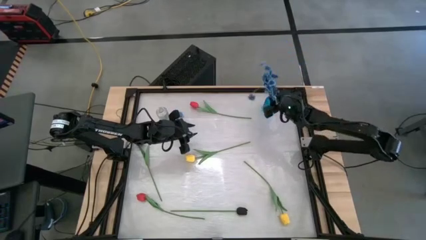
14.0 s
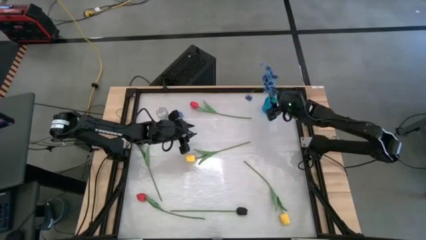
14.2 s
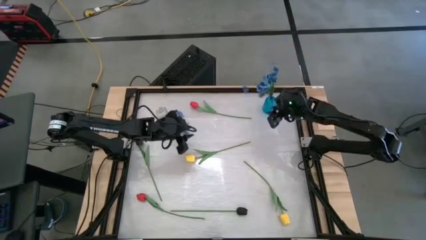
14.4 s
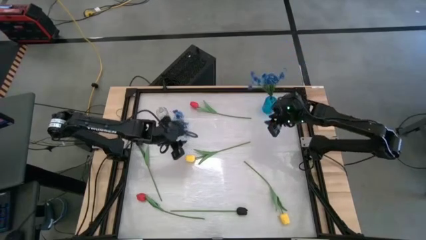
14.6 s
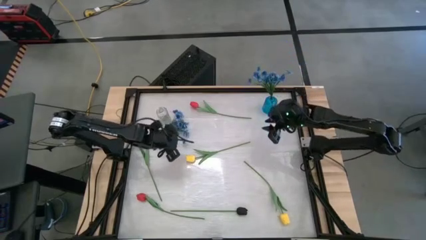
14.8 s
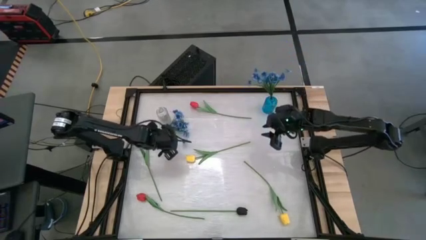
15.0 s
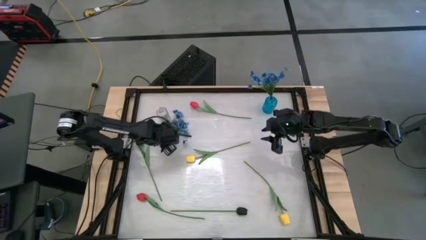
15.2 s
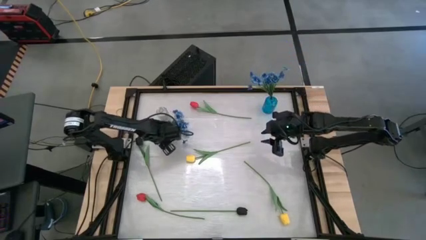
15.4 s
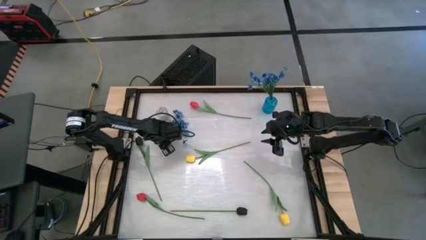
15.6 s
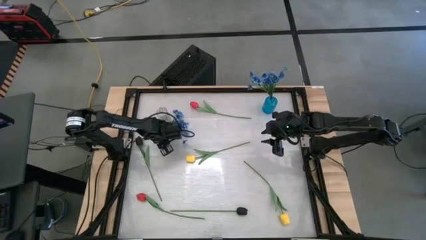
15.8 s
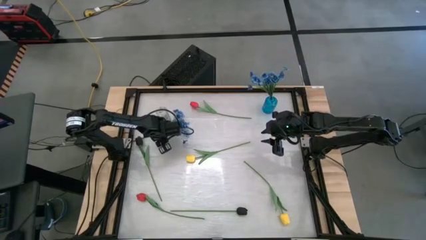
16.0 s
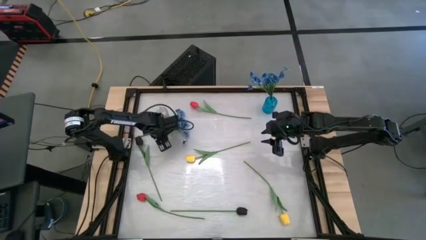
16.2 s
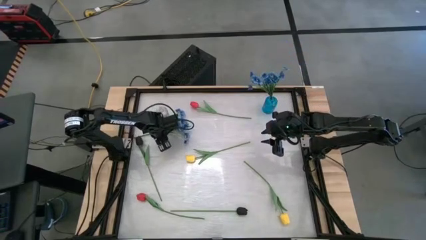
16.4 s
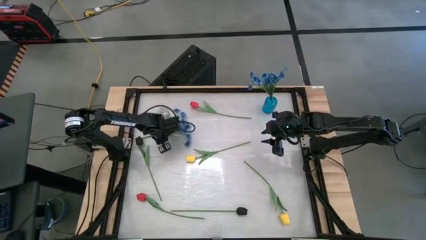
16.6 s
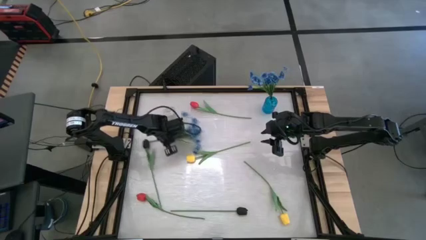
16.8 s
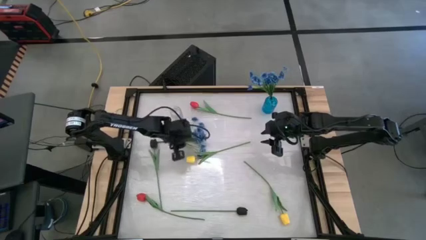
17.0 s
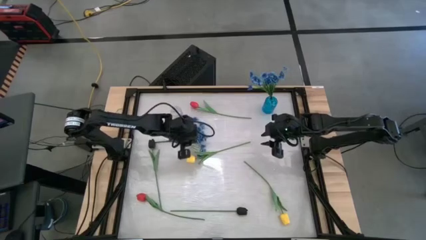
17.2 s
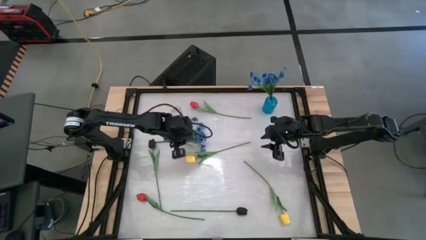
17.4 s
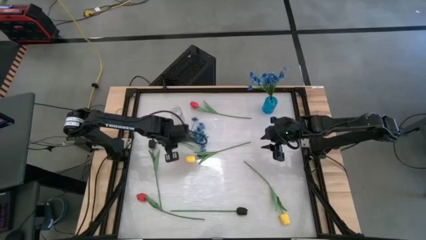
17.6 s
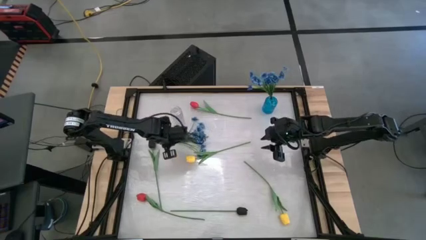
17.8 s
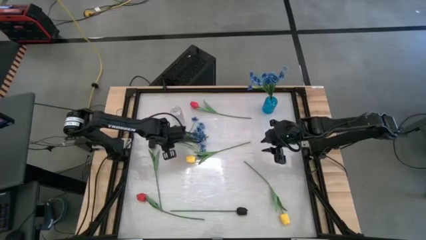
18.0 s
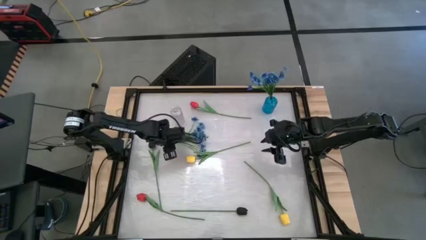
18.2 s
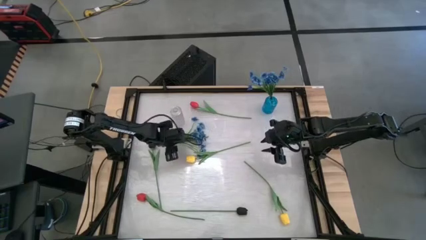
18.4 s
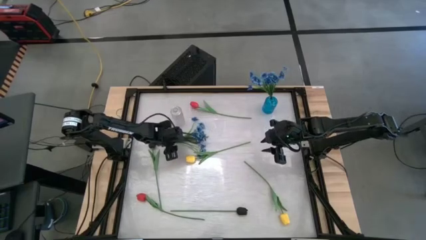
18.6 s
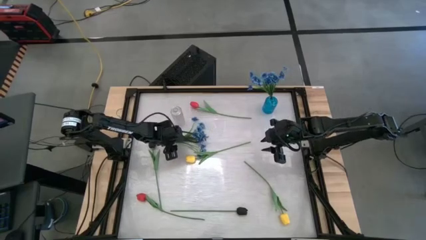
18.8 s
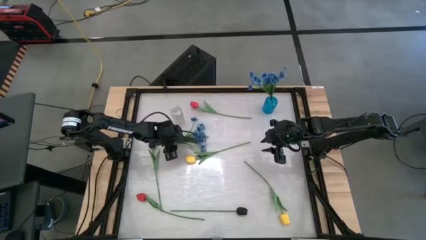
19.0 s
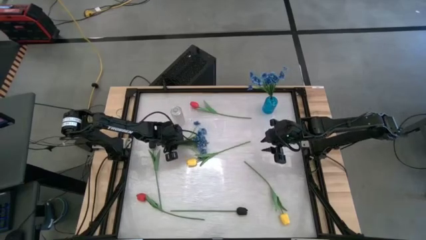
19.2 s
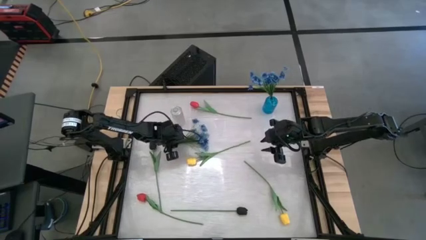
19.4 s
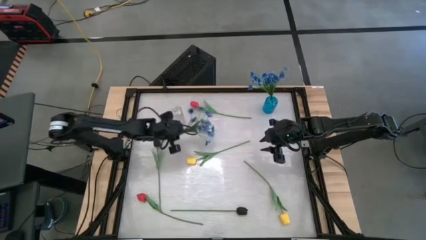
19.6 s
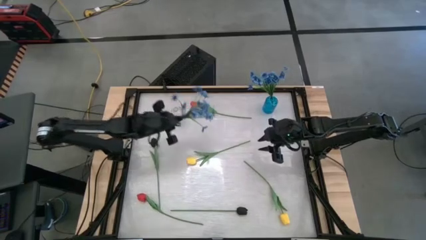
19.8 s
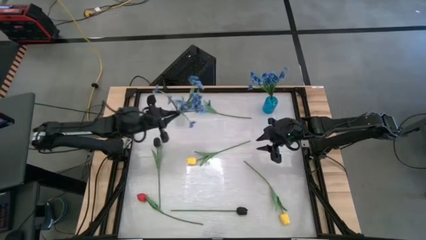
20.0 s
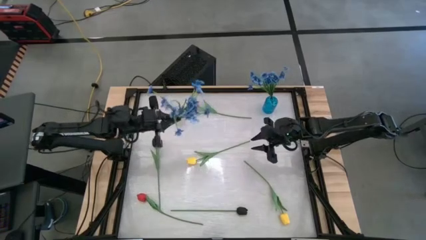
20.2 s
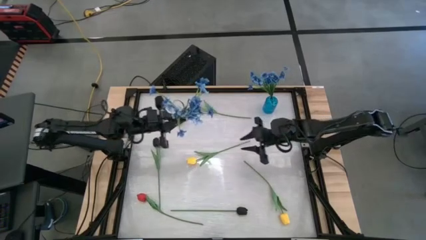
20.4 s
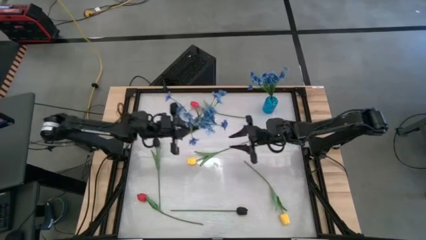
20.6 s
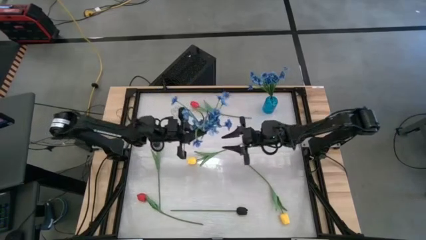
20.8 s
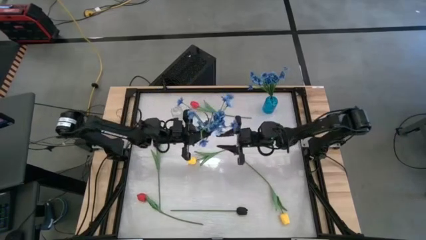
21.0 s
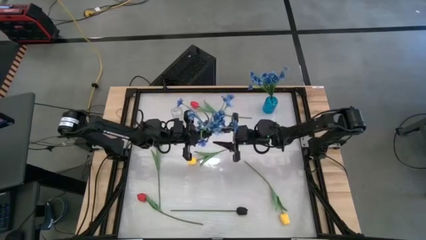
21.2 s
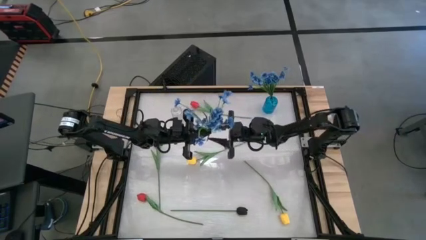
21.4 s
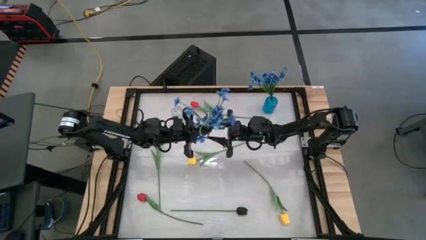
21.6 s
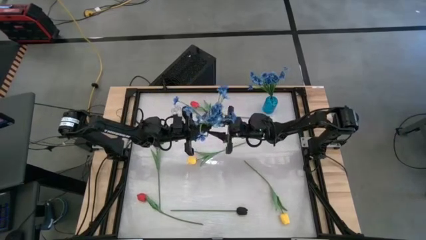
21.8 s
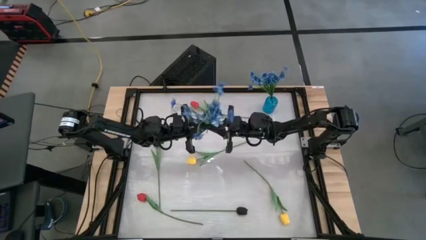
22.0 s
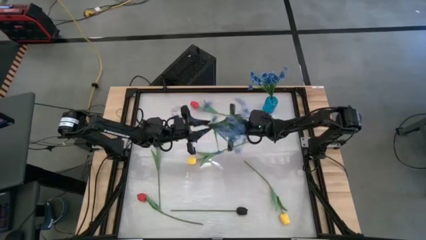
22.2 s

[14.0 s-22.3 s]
Task: Sort flowers into vase by color
Put the blue flower into the blue vase

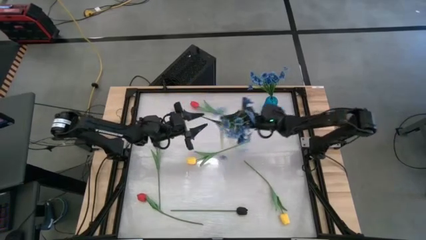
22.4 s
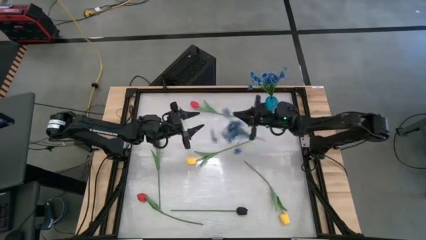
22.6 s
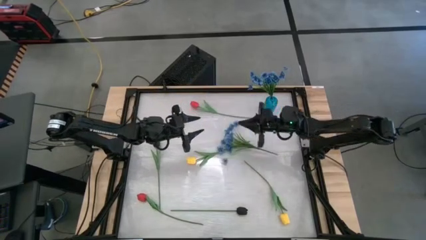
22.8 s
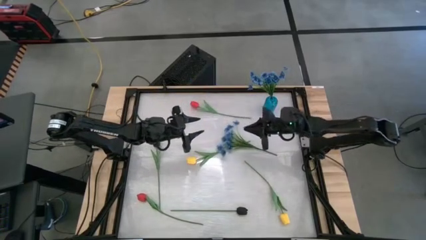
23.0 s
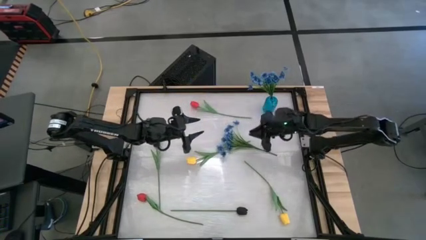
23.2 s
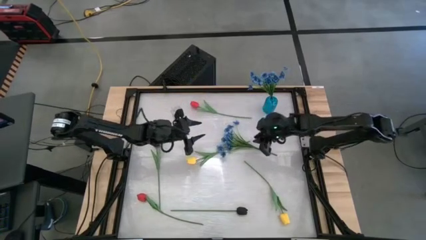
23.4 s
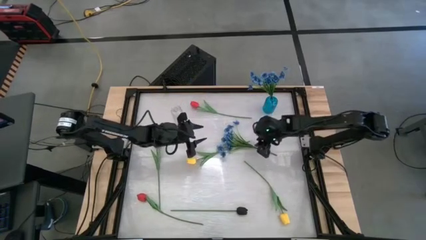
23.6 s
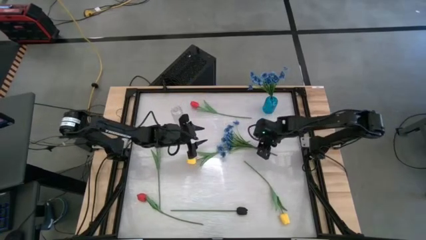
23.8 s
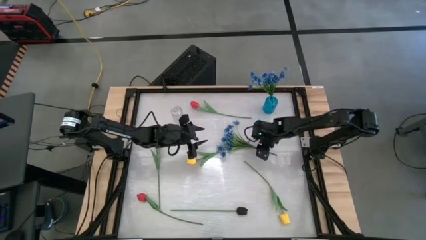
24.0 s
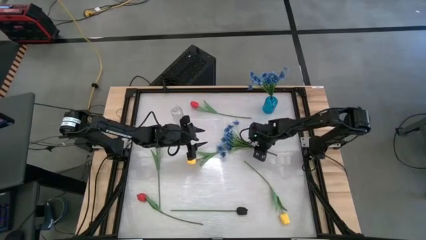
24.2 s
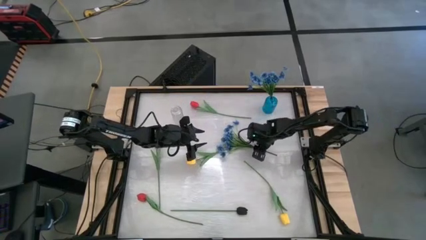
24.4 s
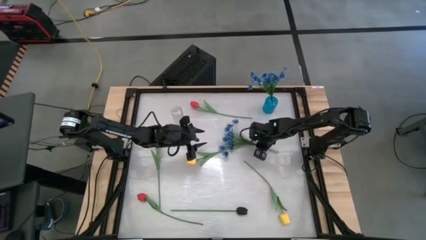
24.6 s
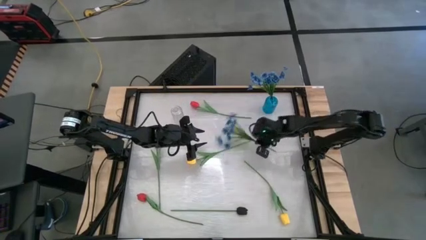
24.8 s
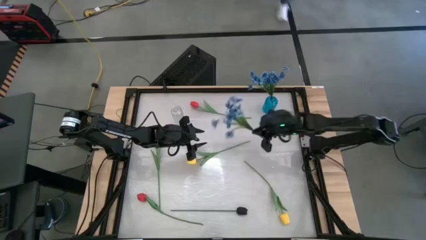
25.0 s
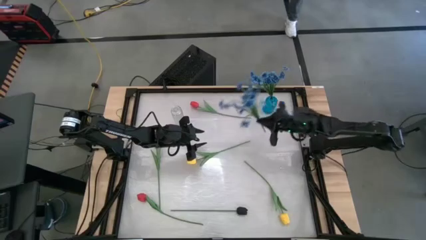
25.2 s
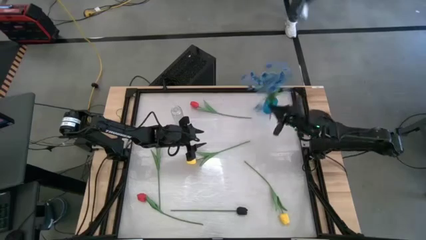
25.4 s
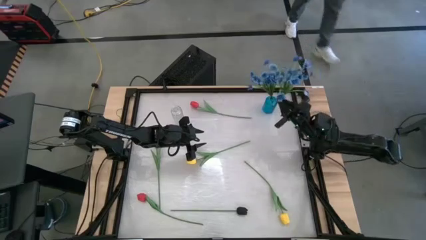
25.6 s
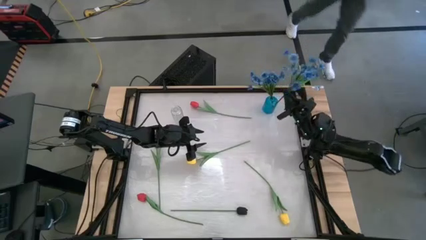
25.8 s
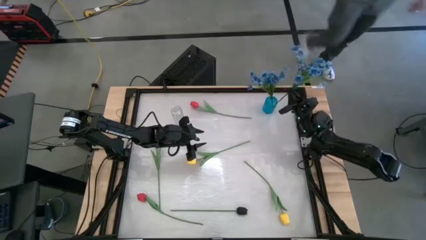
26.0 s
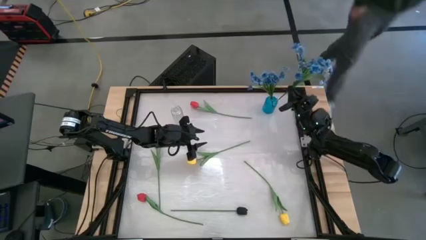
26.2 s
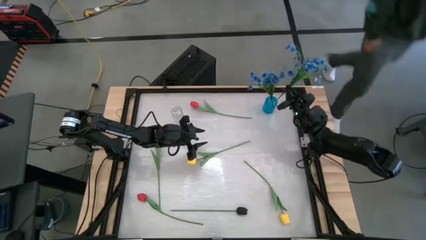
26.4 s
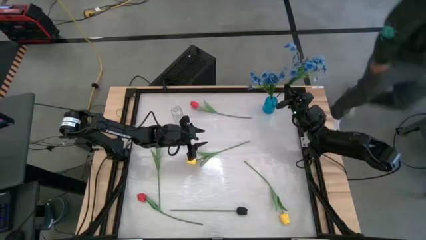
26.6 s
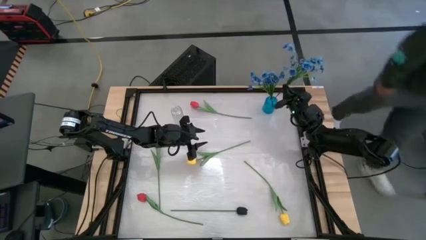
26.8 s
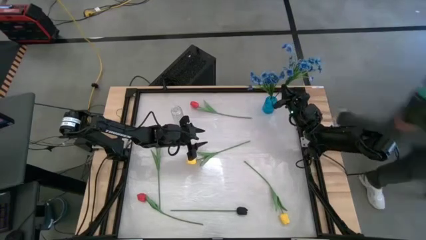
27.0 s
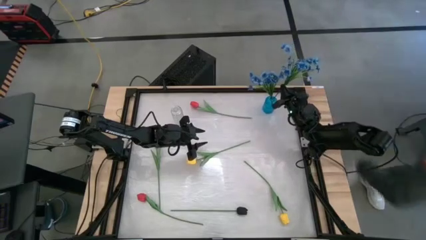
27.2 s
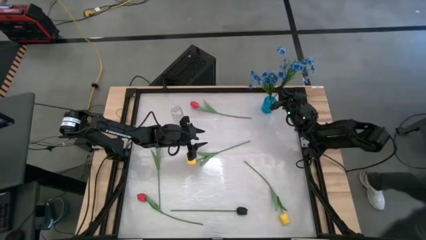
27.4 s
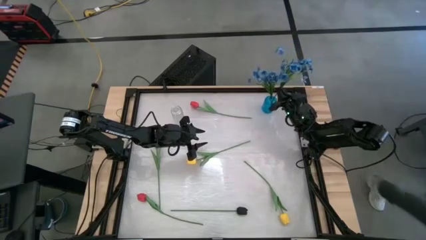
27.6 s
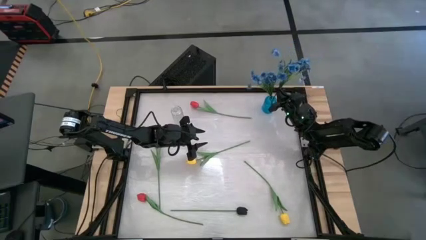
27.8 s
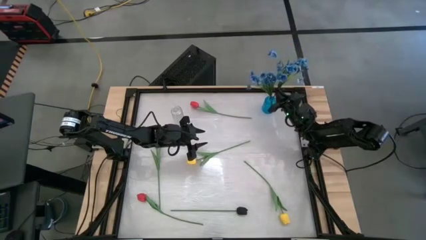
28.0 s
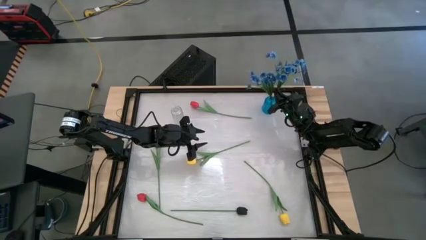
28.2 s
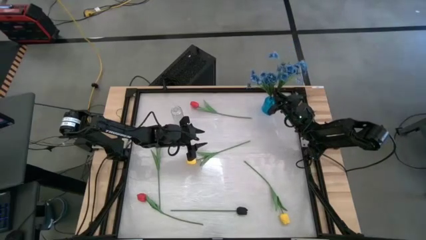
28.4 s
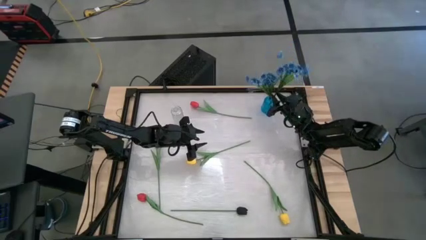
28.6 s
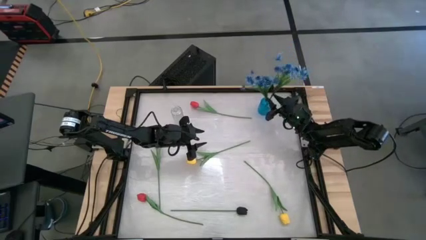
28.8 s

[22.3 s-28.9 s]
Put the blue flower into the blue vase
